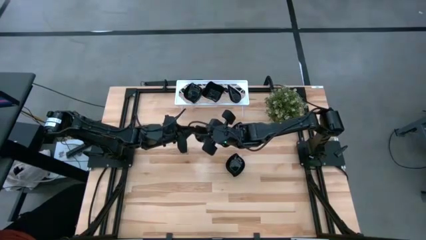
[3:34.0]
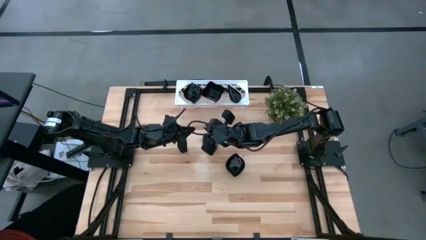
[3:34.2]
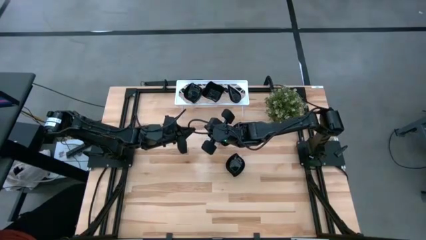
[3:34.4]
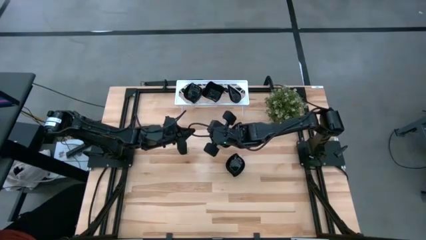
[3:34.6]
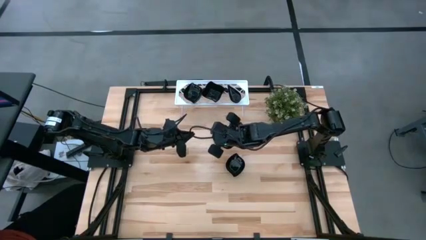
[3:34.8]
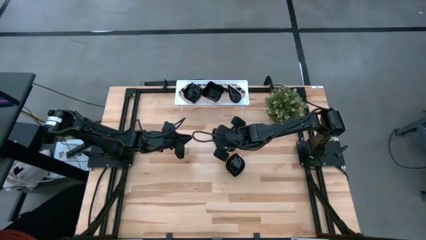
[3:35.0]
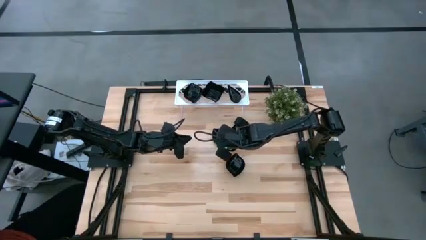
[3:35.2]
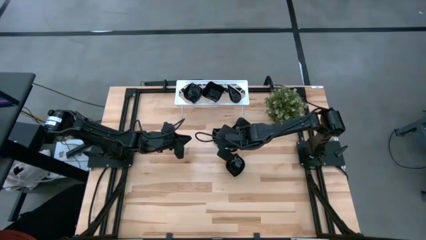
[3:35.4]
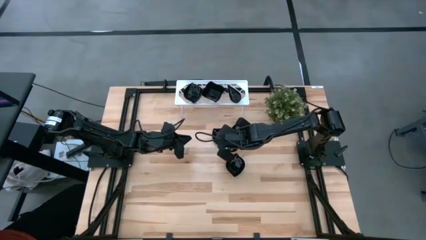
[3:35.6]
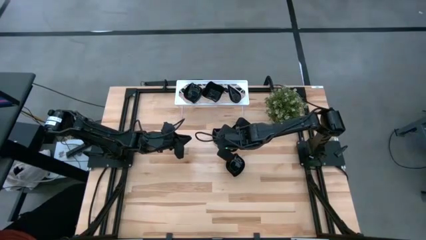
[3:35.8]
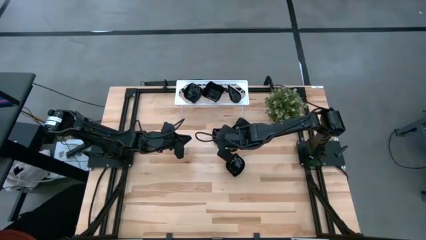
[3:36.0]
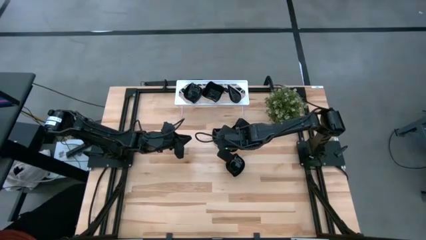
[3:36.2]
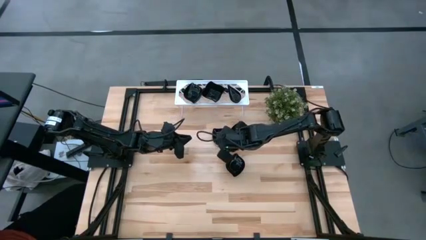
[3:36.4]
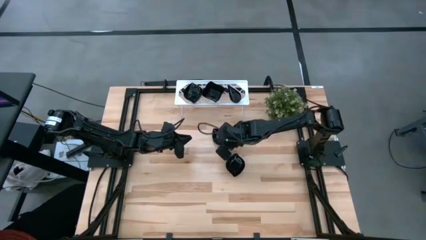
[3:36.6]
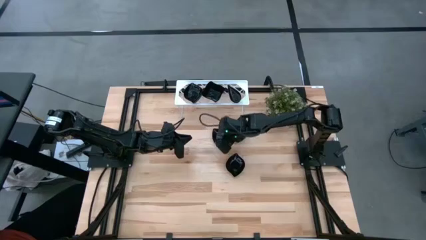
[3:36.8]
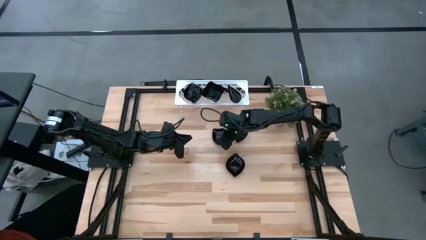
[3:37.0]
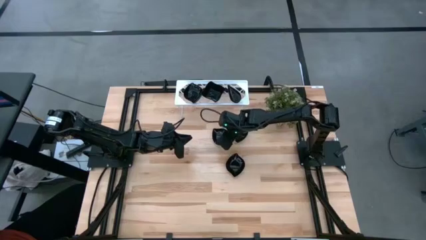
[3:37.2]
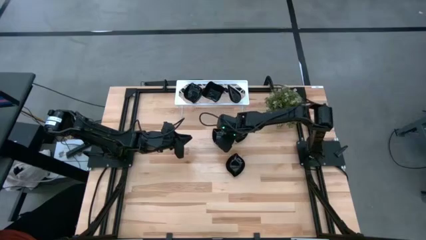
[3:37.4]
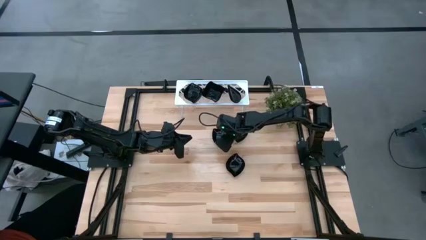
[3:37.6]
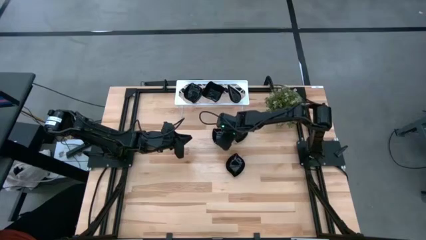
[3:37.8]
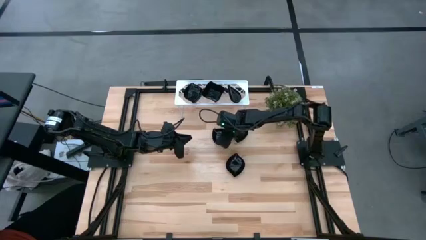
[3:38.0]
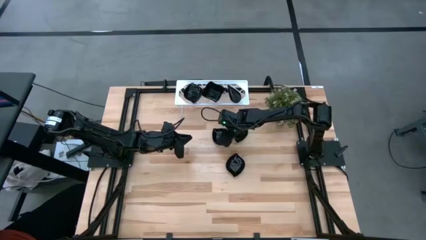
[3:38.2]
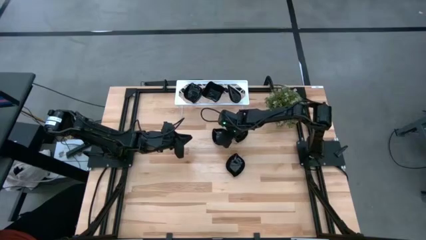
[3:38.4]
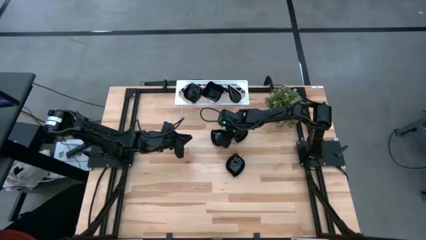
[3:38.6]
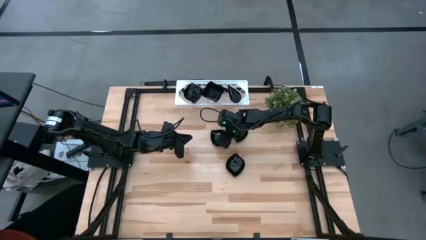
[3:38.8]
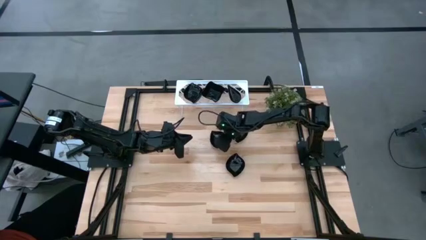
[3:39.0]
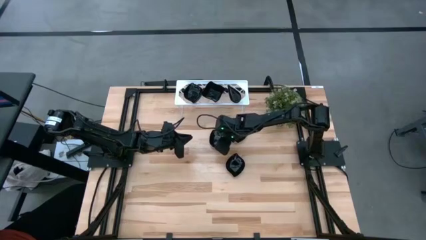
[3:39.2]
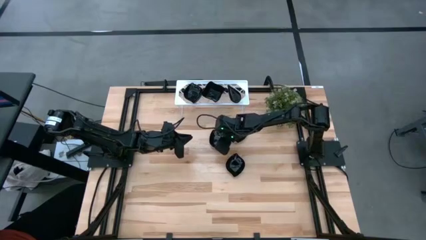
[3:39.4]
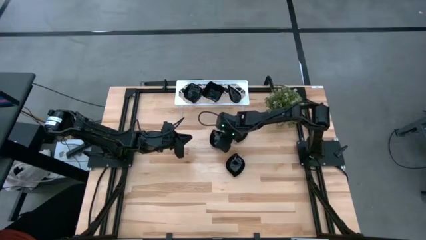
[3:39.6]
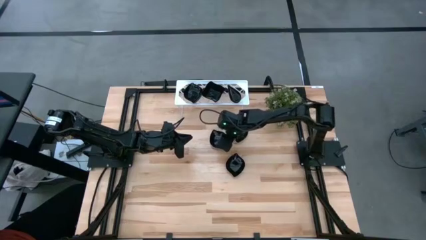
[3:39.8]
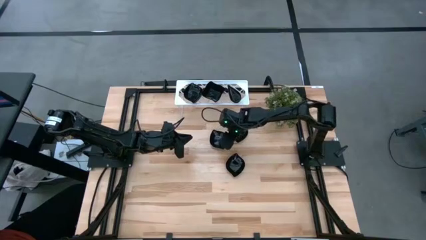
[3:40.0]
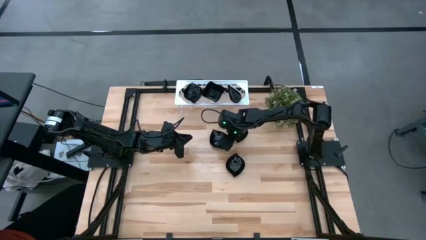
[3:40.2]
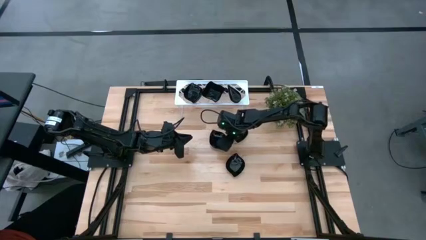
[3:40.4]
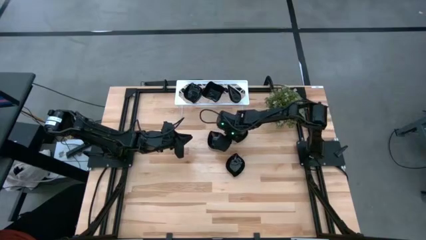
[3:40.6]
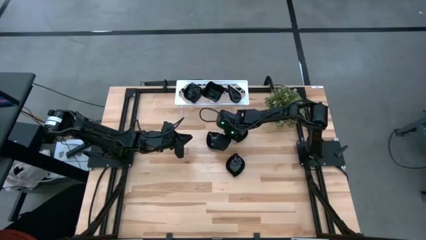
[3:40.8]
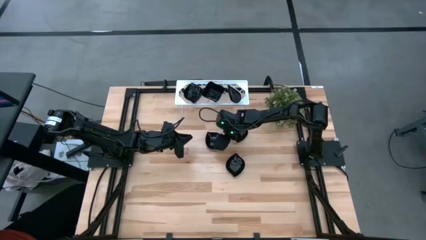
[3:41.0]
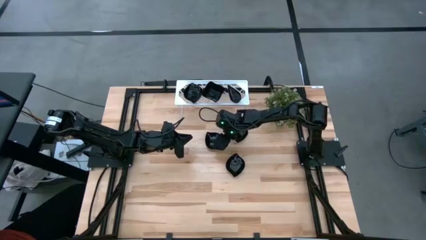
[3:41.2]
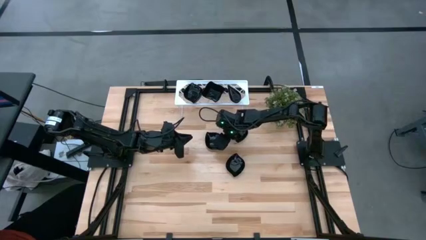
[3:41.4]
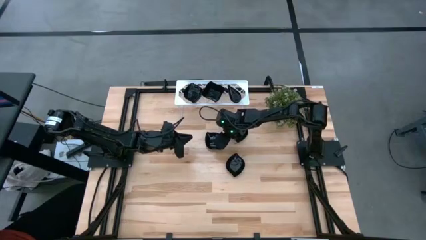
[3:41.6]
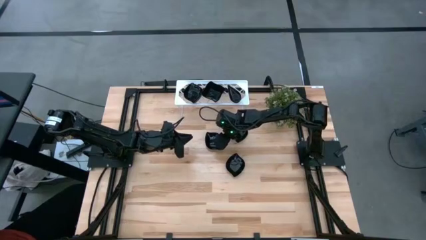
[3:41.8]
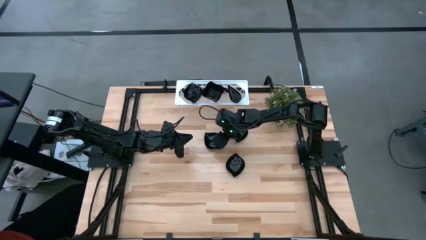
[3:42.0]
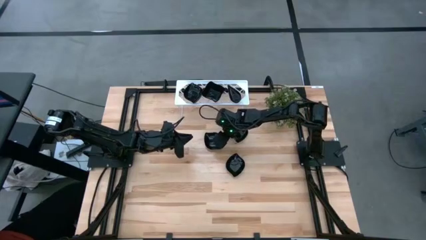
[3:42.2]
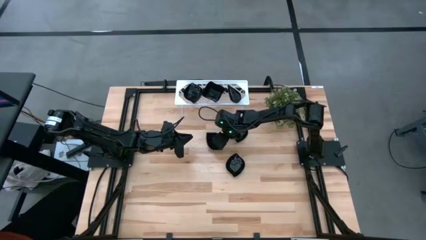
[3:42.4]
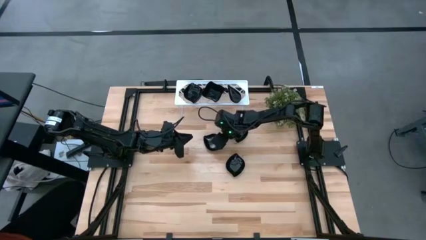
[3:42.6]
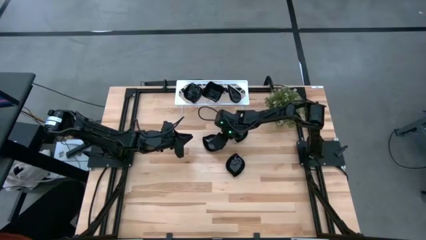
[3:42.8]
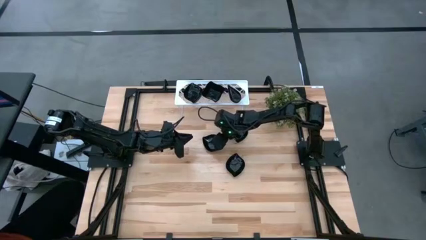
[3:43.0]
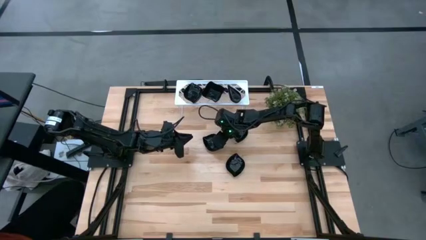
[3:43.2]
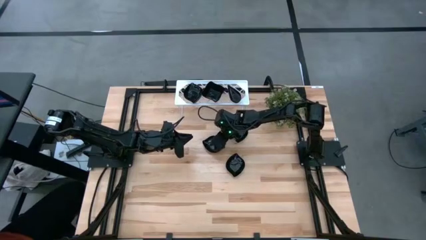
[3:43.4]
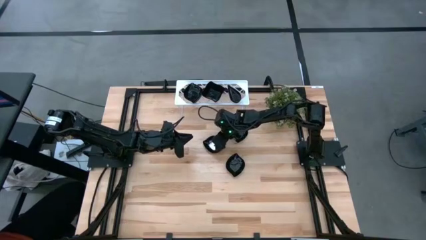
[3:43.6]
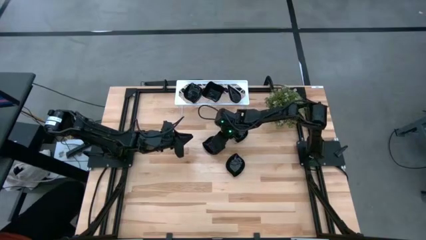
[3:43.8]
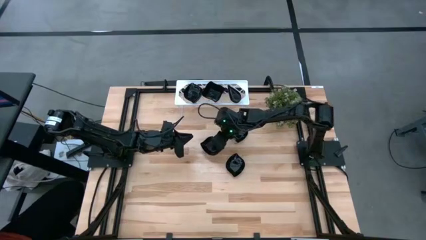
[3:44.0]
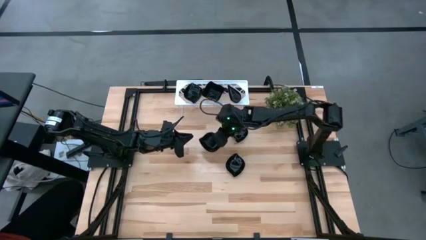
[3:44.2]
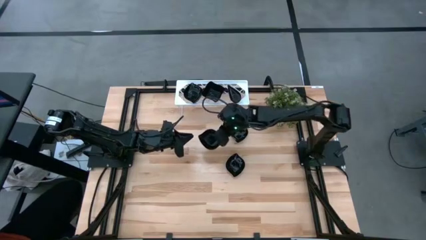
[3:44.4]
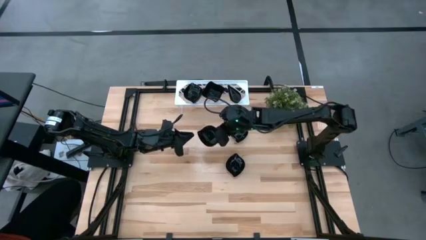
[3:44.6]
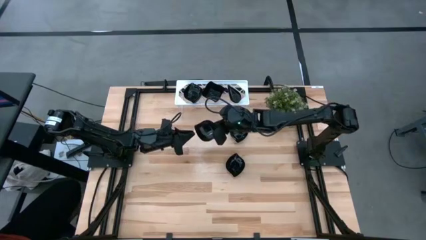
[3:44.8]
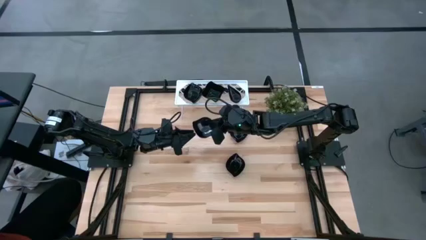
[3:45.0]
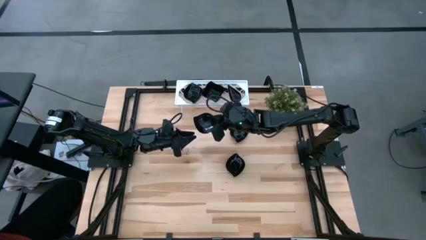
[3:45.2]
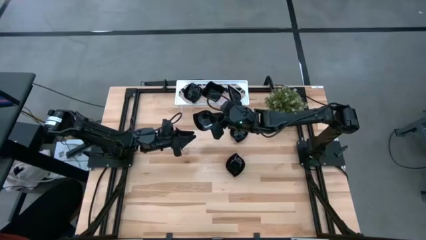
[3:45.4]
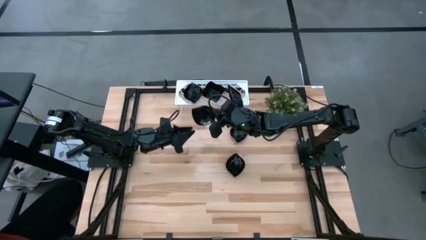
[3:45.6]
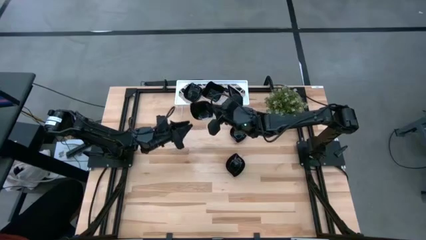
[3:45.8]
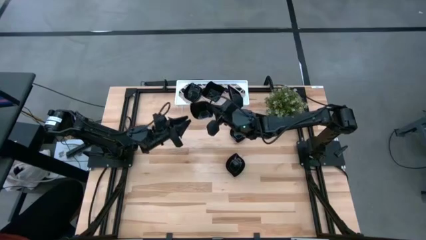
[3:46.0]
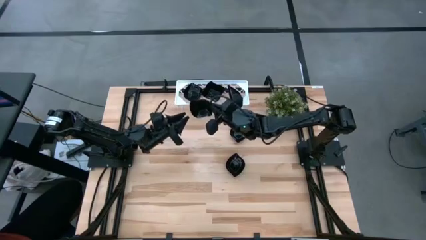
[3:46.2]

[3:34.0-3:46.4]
Task: Pick & Place Mini shaped plates
Stack the leaf-shaped plate on top of the other leaf-shaped plates on the shelf

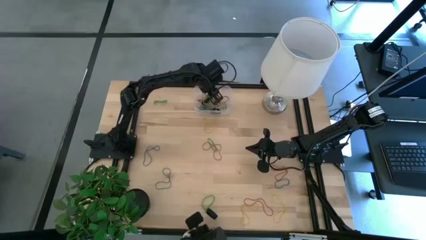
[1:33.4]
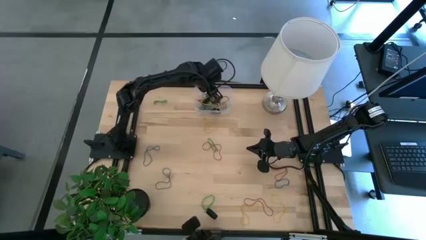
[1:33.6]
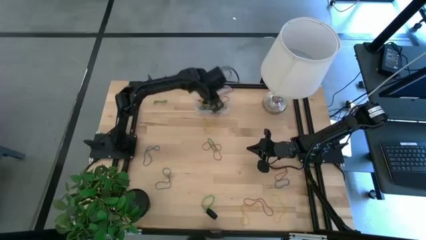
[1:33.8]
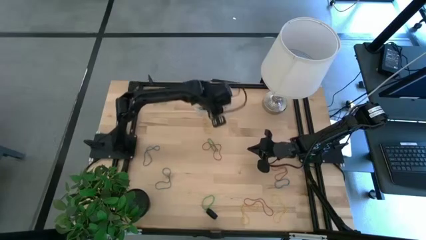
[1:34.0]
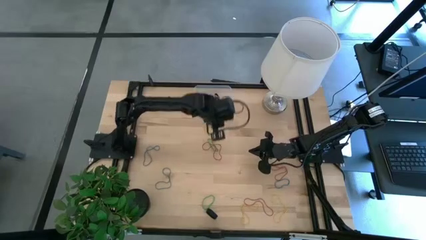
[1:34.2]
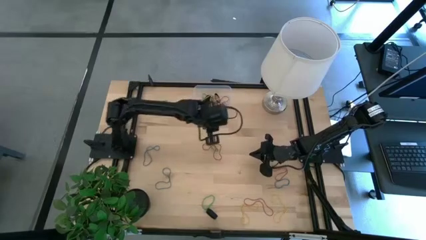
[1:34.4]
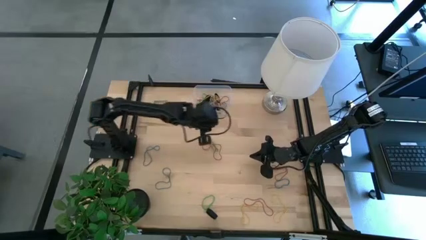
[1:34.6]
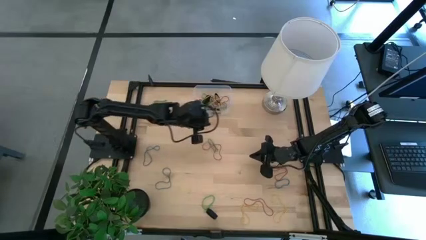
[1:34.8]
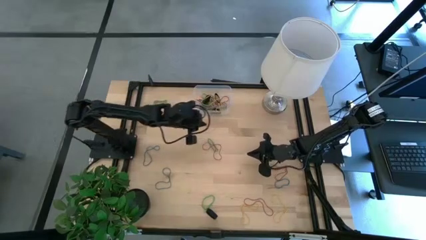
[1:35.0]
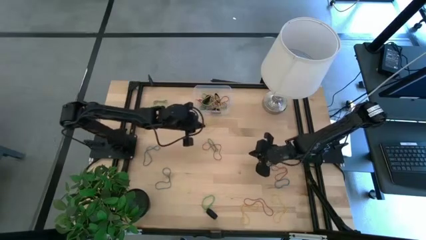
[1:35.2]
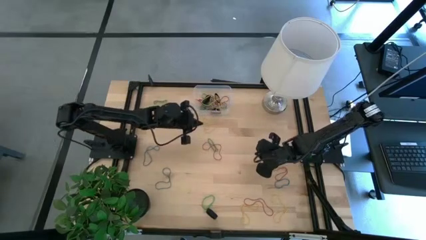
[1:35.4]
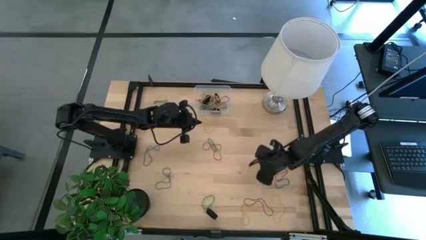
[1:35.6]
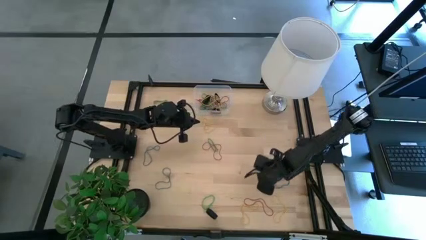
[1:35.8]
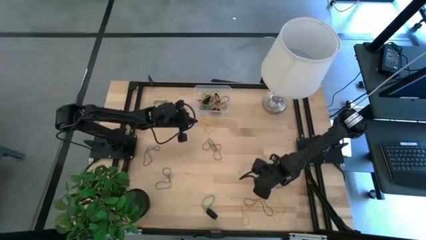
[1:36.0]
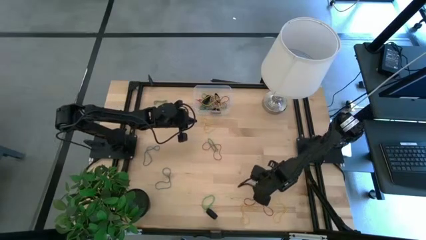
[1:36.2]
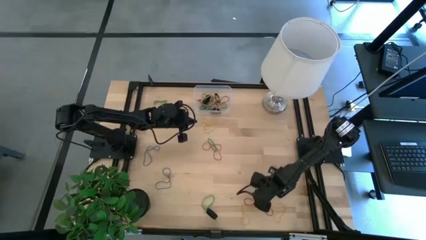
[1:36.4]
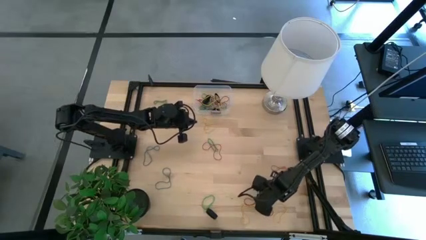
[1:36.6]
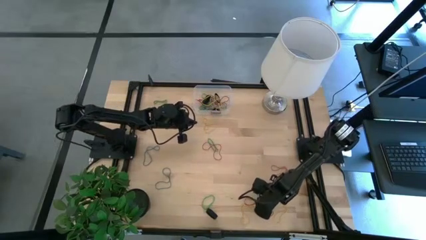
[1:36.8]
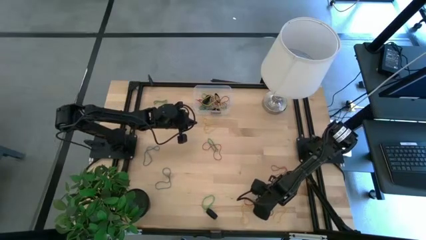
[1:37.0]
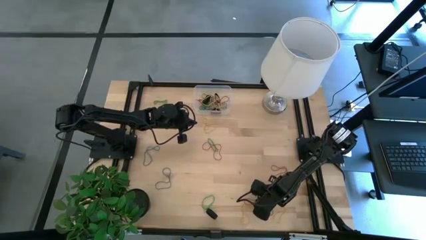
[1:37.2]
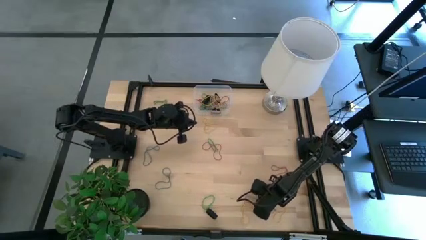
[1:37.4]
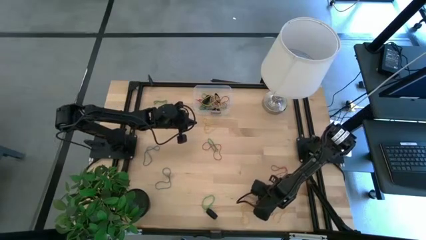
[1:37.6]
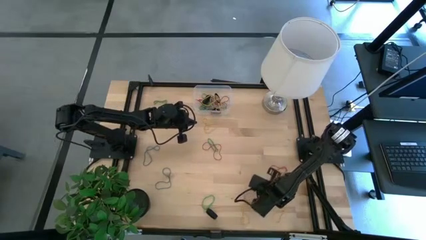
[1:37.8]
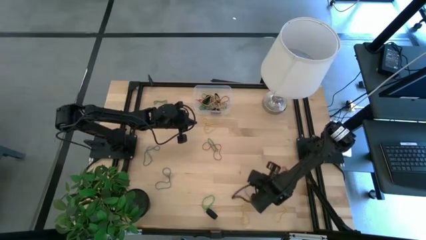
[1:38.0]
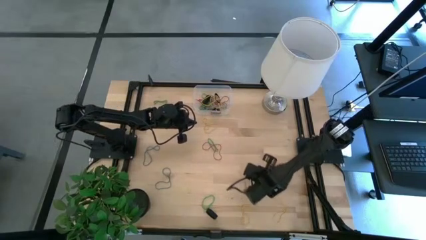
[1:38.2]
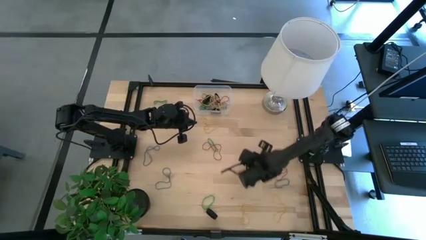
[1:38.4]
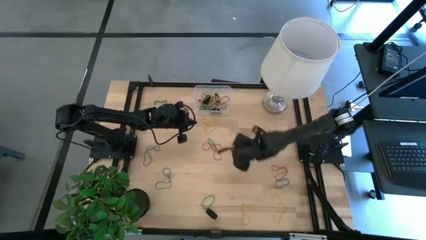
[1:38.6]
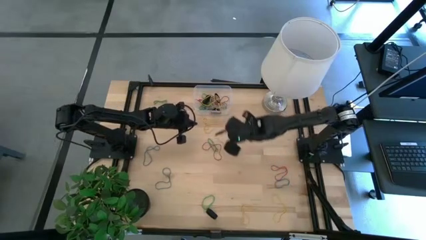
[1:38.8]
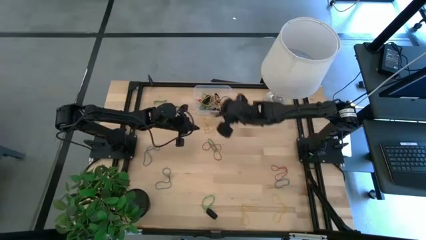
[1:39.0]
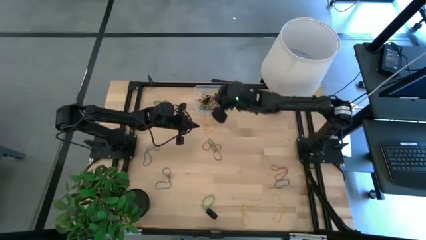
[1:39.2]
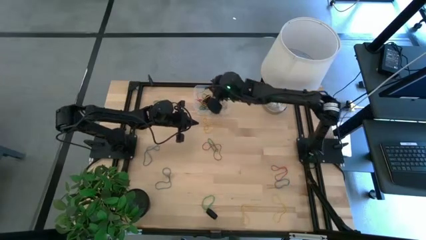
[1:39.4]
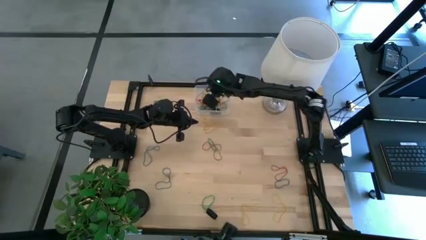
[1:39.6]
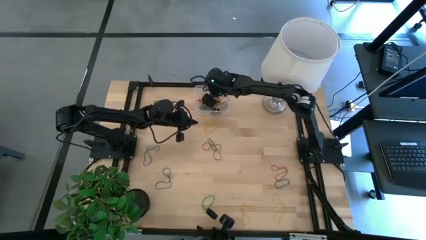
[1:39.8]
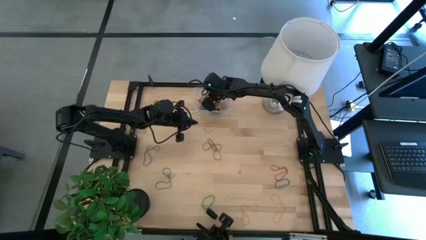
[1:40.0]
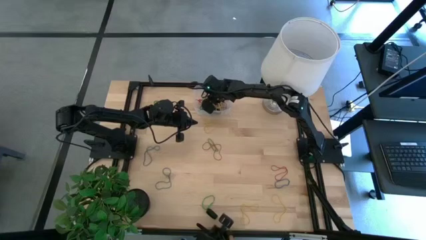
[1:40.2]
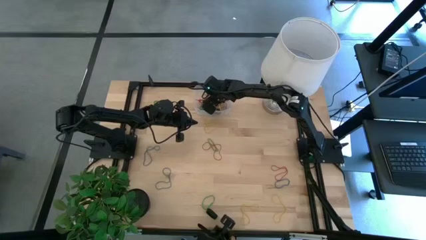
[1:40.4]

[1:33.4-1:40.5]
Task: Pick and place rubber bands into bin
Put the red rubber band into the transparent bin
